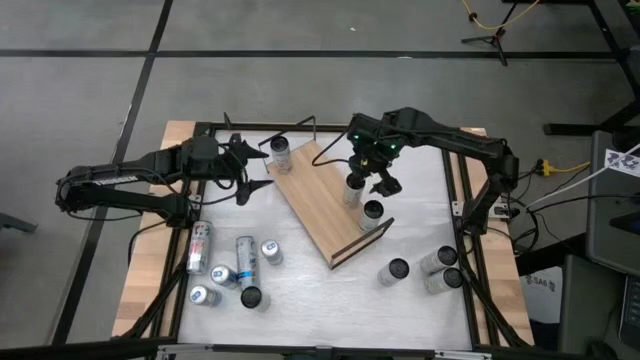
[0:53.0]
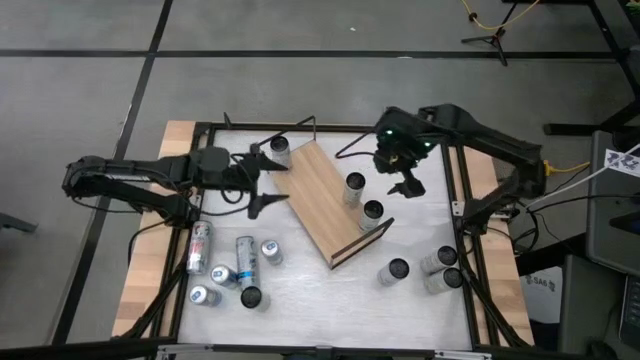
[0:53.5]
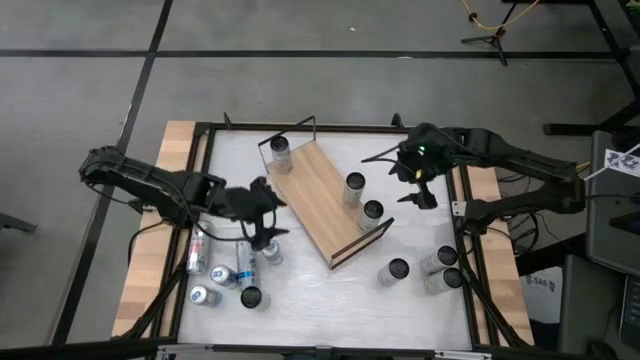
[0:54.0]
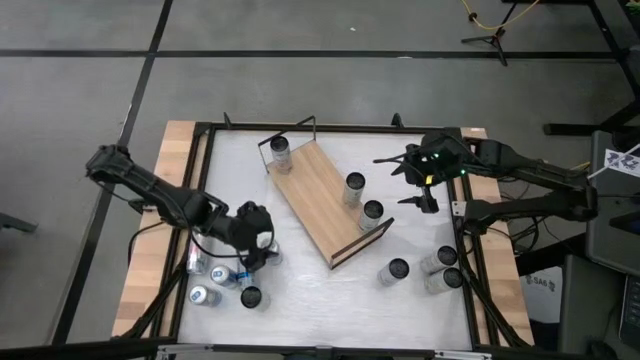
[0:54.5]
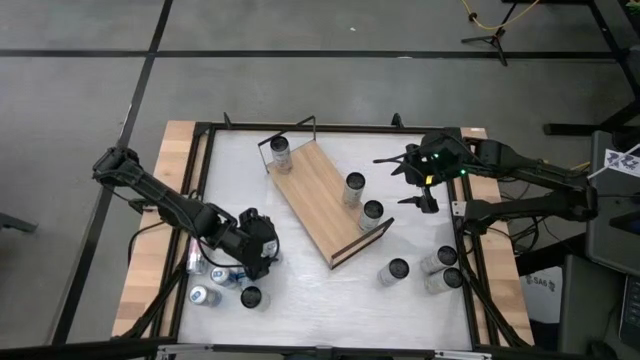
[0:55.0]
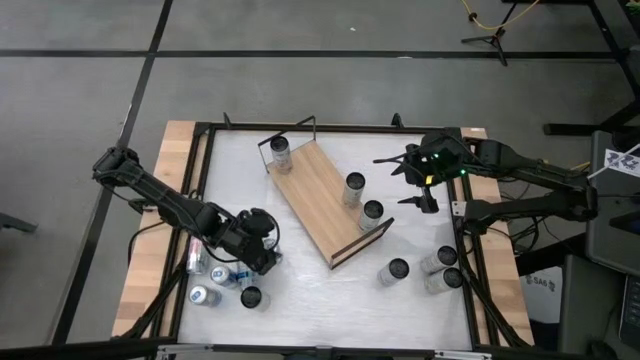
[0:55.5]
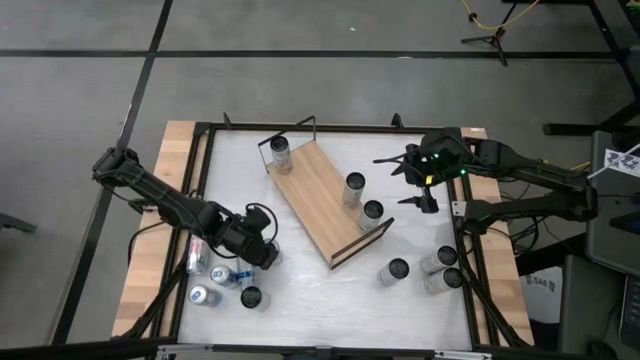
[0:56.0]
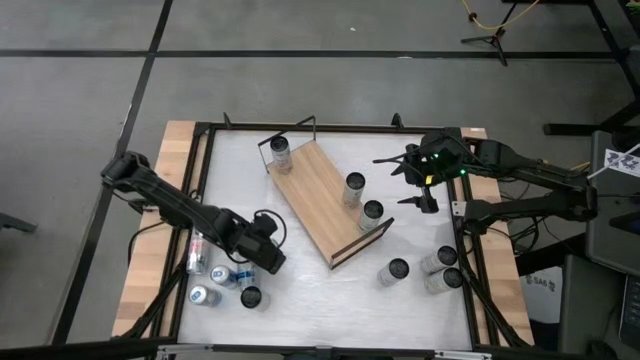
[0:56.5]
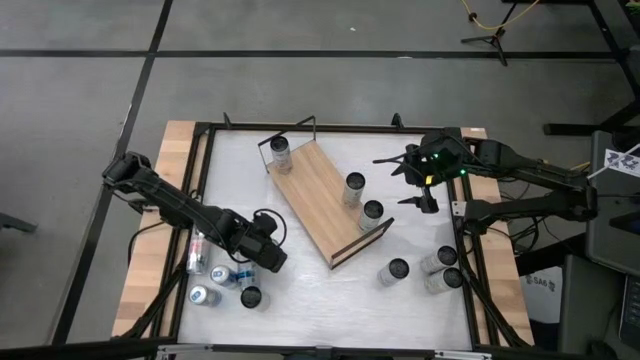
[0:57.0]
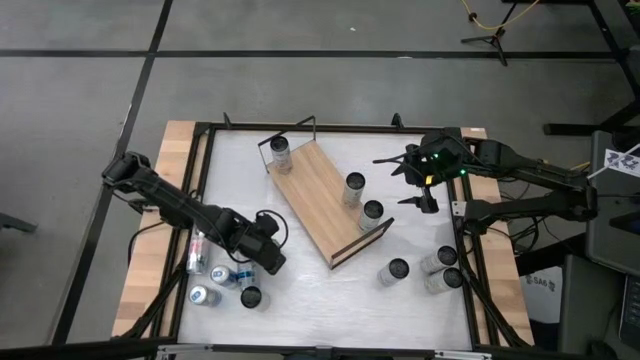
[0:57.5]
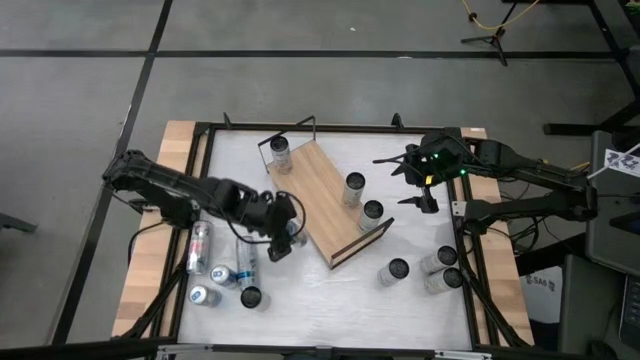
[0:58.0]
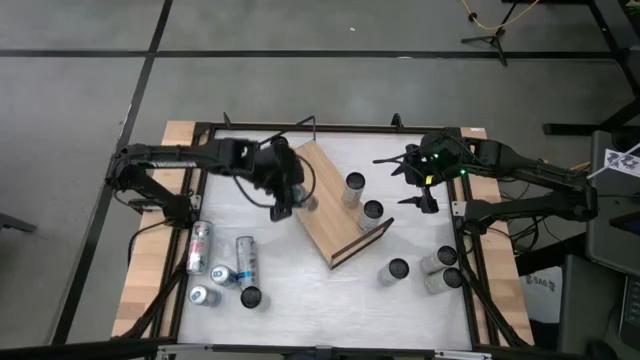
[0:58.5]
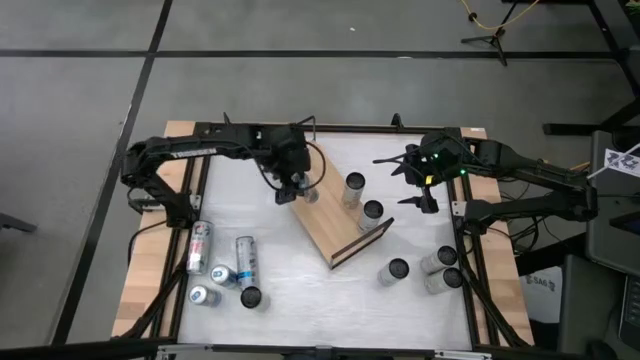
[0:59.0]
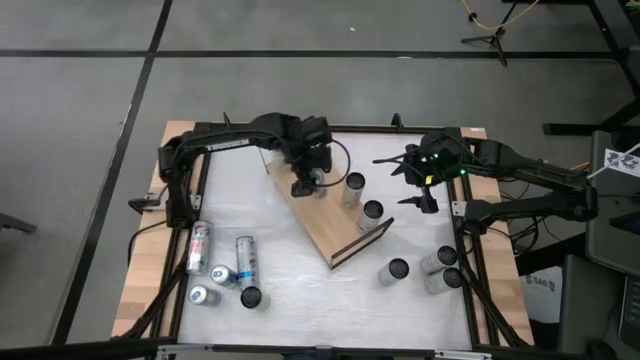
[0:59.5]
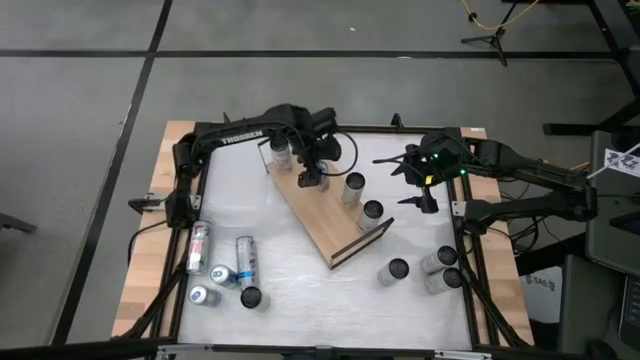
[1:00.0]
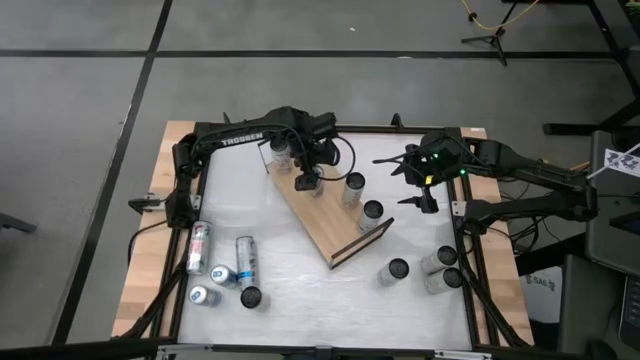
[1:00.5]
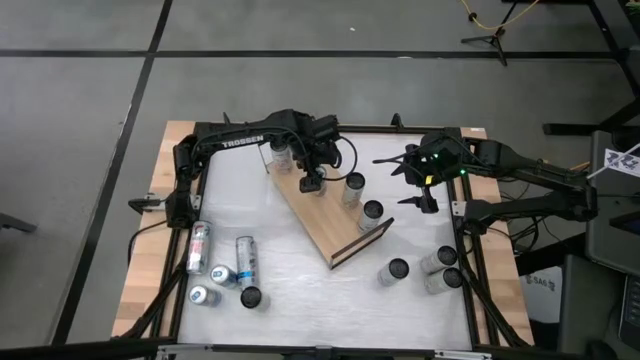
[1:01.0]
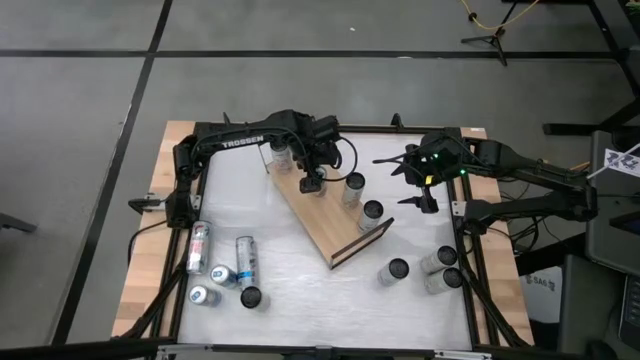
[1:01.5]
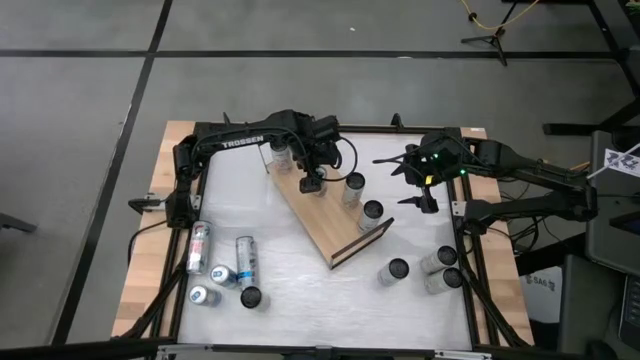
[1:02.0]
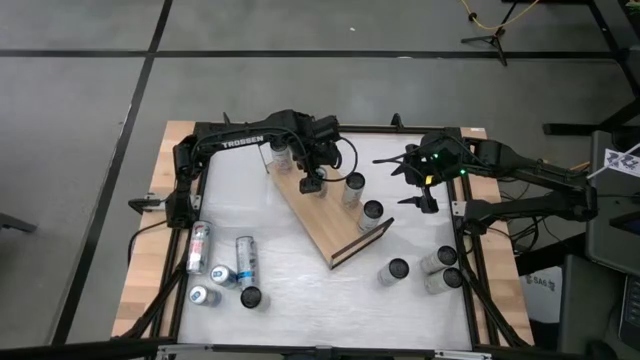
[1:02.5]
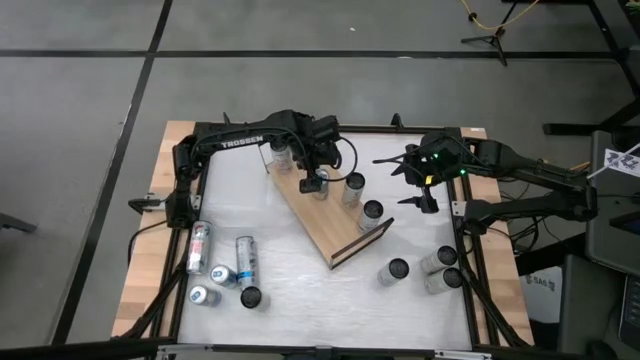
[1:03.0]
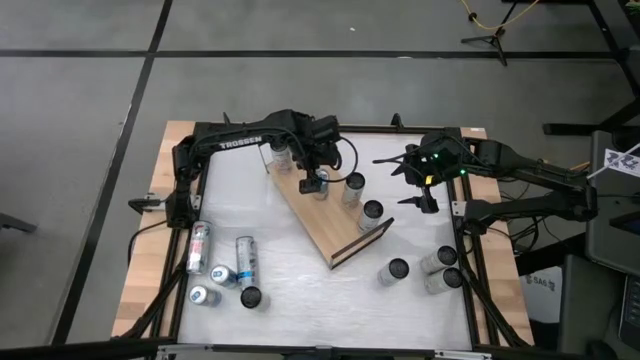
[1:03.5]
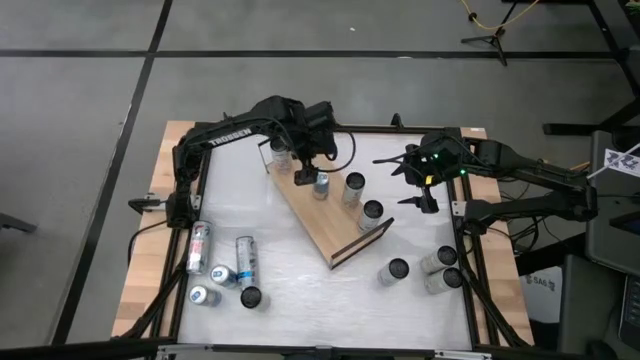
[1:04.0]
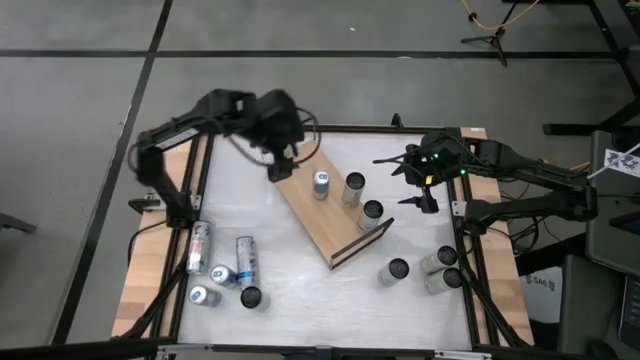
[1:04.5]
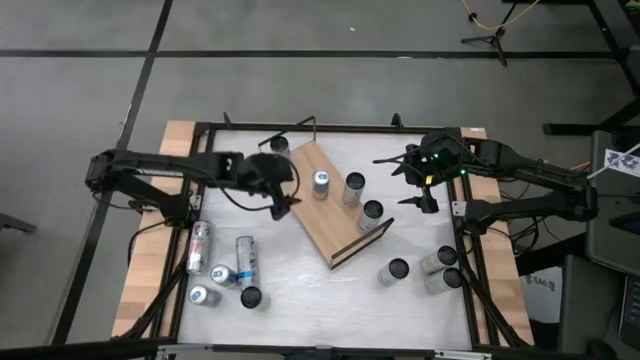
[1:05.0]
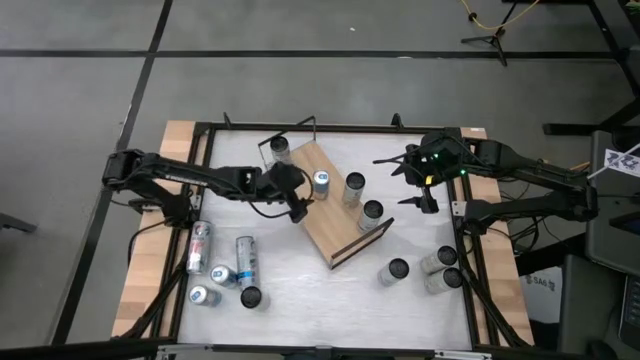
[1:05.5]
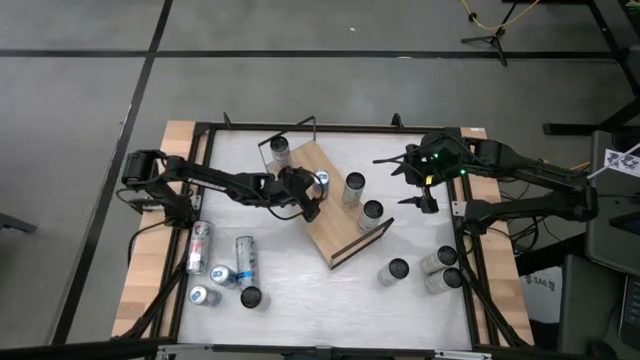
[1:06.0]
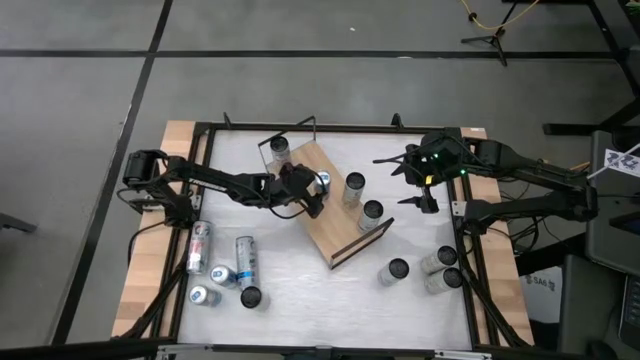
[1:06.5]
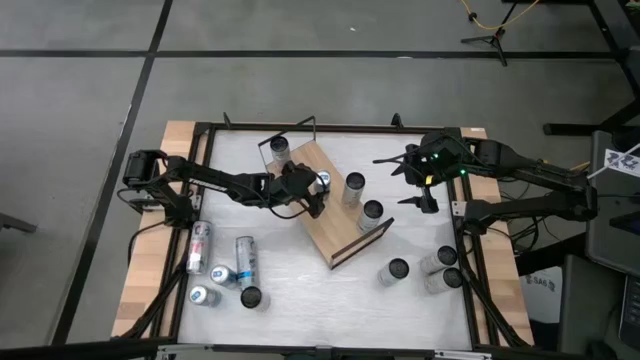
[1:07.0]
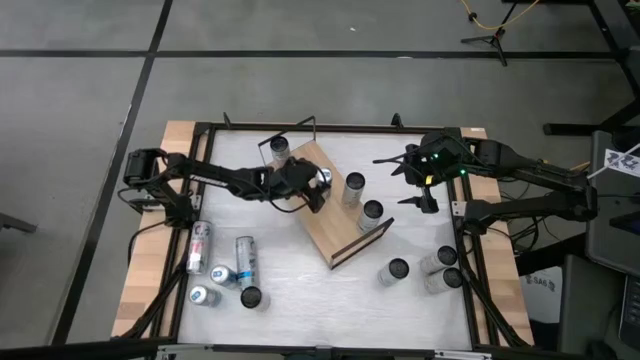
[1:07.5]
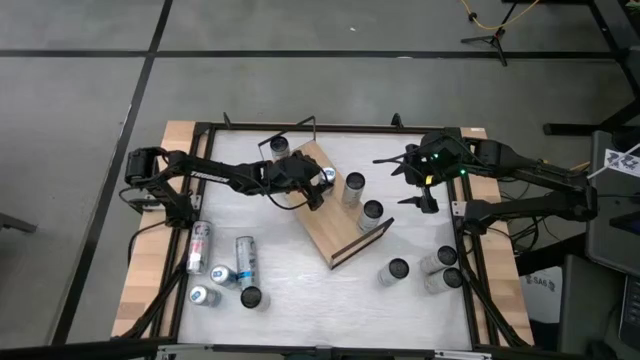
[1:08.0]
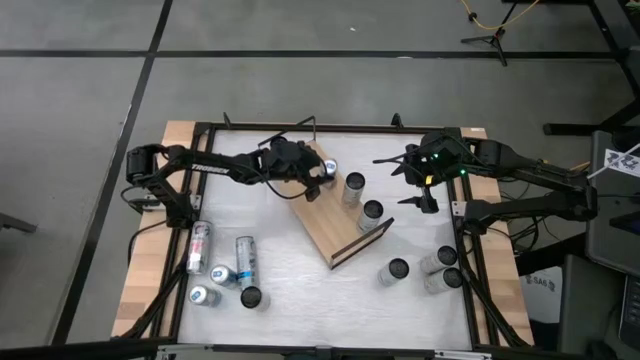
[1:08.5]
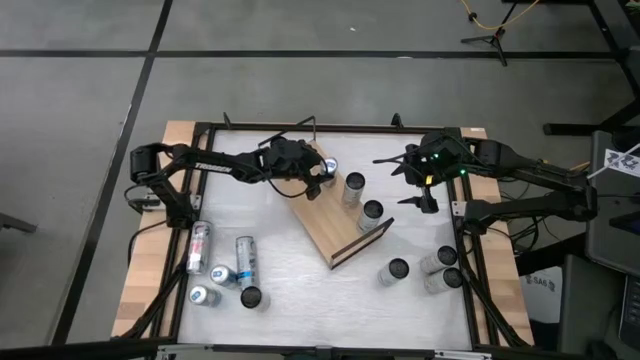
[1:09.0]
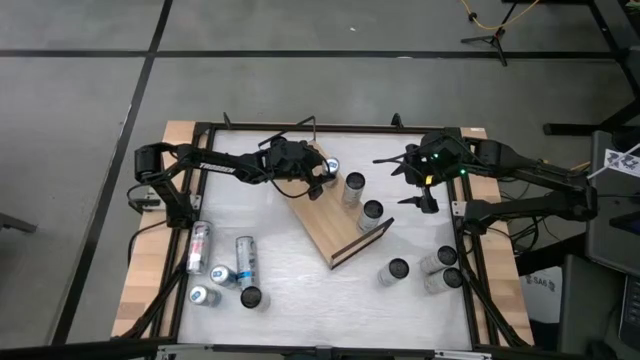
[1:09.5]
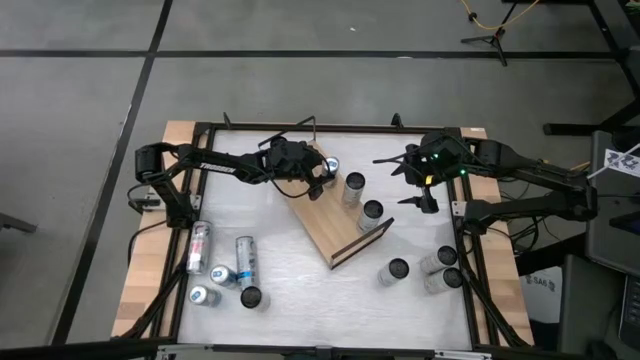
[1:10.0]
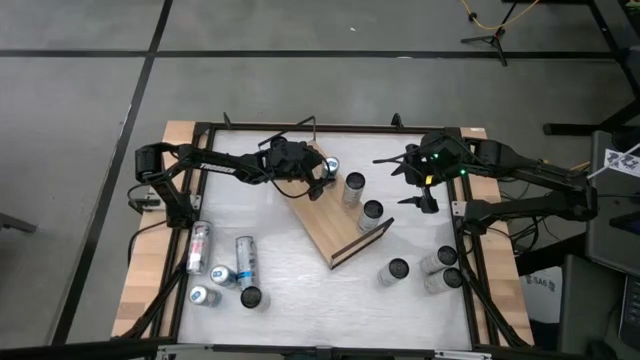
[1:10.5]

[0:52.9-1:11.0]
Task: Place canned beverage on shelf
Put the top blue soda can on the shelf

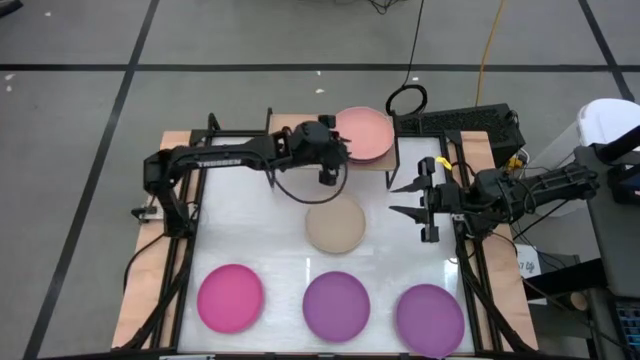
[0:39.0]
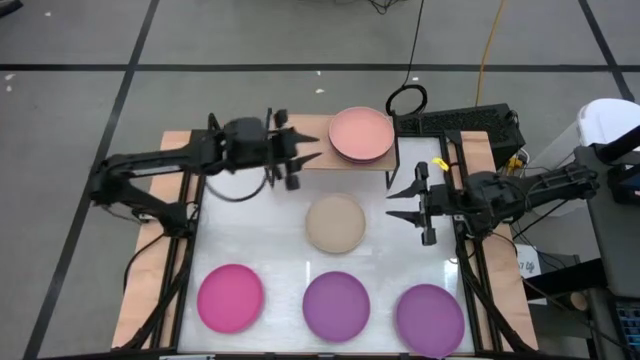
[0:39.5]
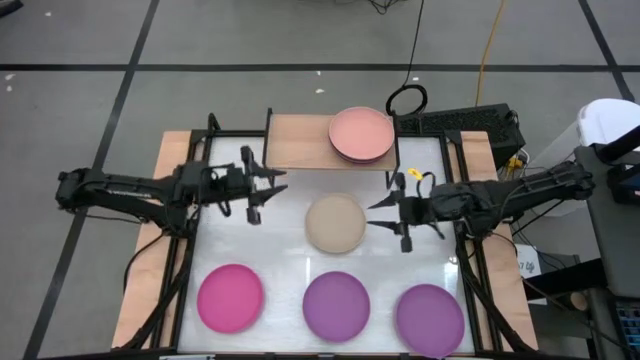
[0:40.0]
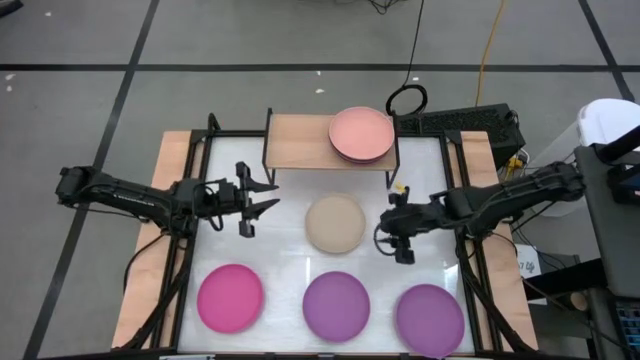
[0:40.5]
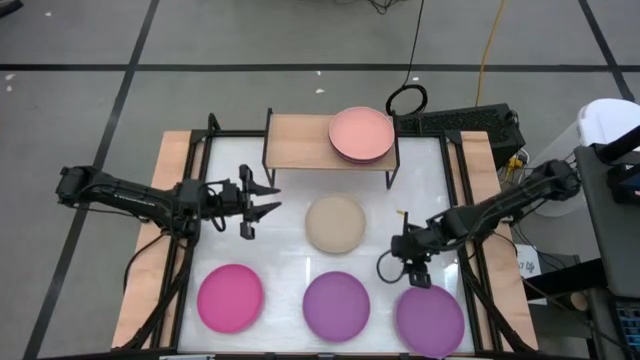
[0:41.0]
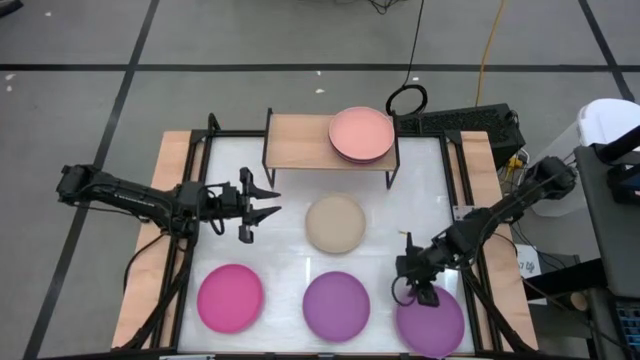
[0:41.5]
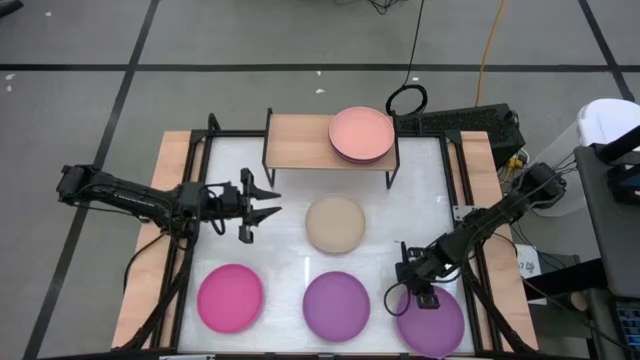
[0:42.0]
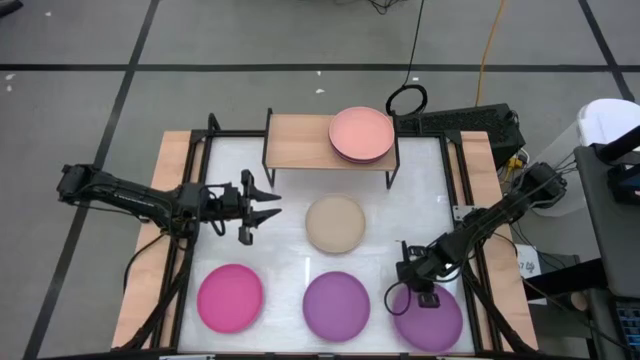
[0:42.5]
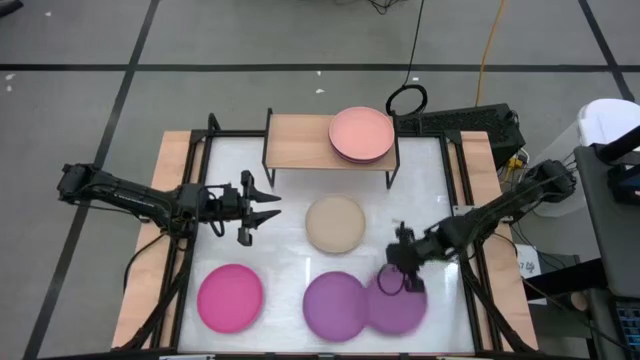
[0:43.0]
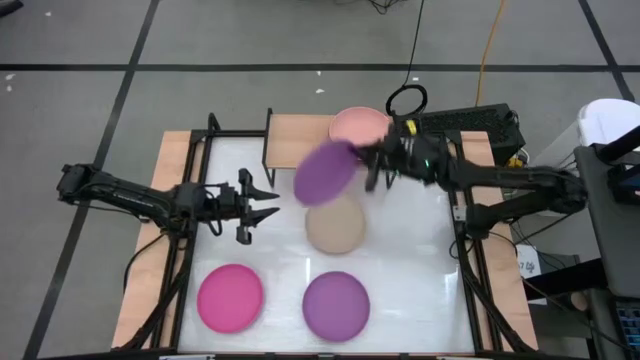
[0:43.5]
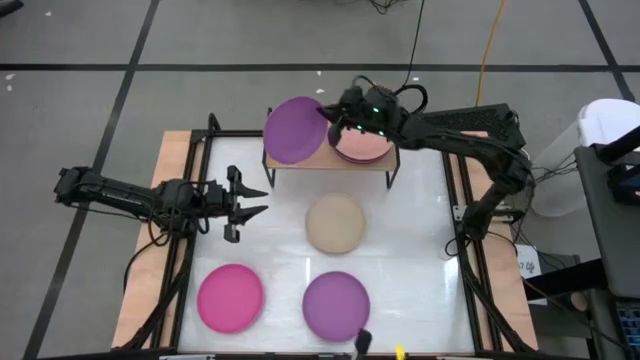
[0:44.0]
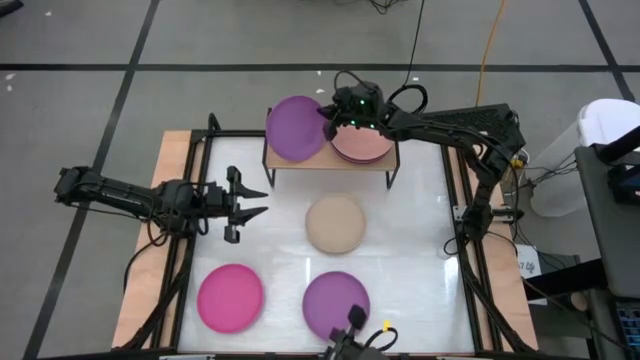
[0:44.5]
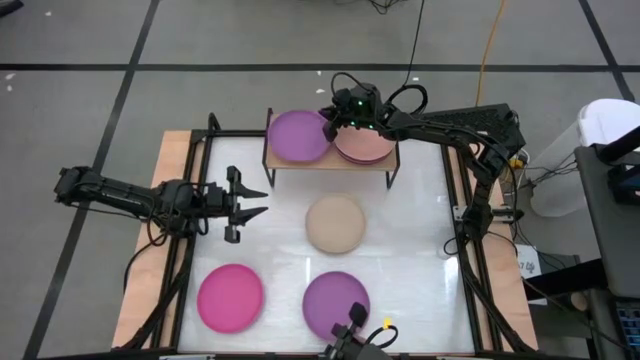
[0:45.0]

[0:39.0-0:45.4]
Task: Place and stack plates onto a shelf
Put the right purple plate on the shelf
